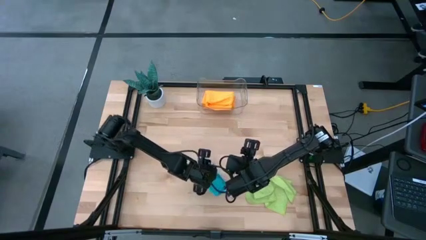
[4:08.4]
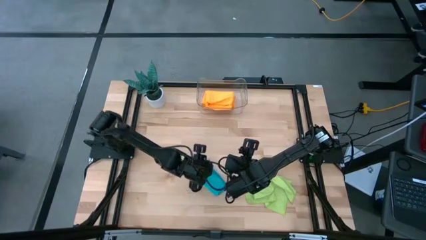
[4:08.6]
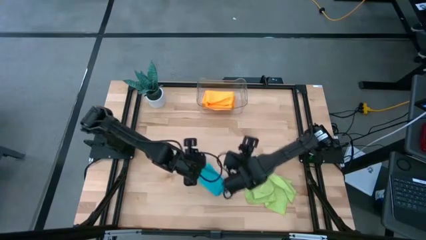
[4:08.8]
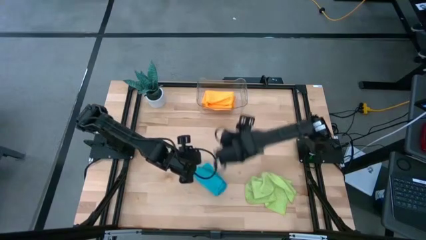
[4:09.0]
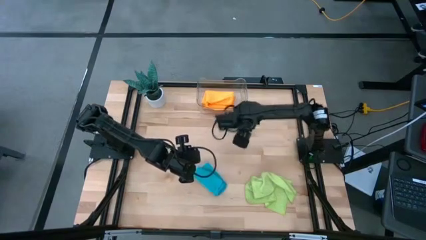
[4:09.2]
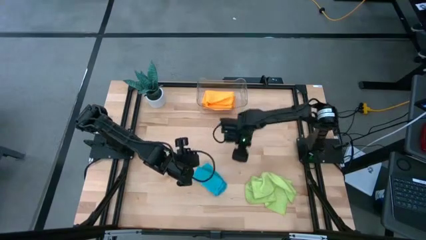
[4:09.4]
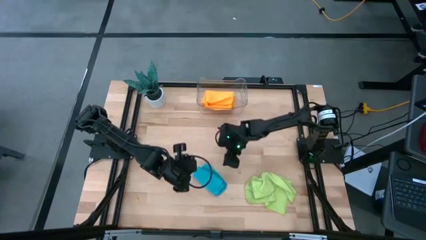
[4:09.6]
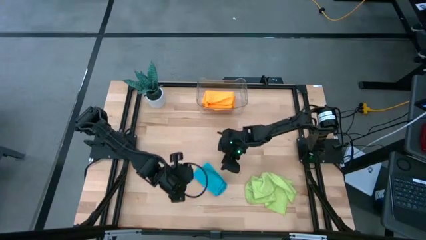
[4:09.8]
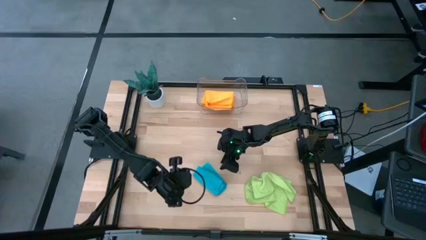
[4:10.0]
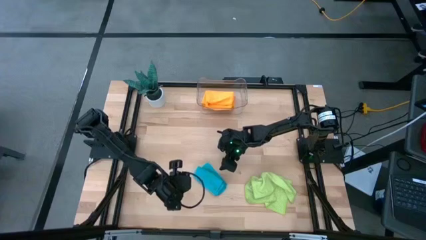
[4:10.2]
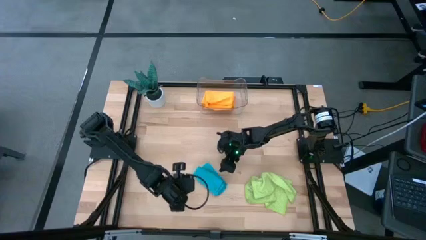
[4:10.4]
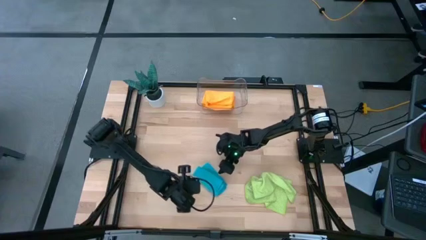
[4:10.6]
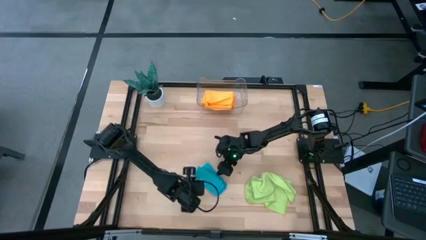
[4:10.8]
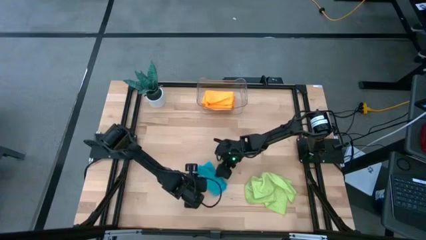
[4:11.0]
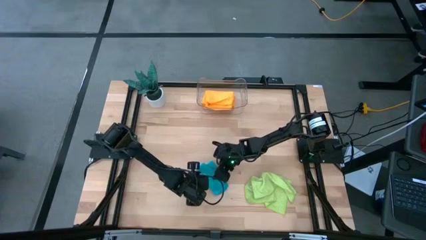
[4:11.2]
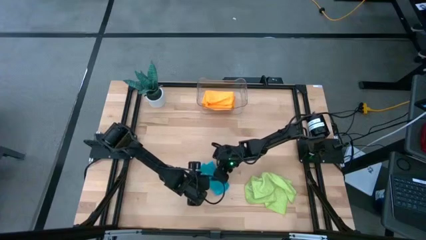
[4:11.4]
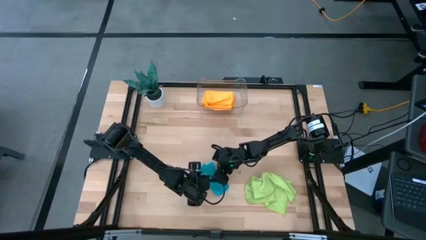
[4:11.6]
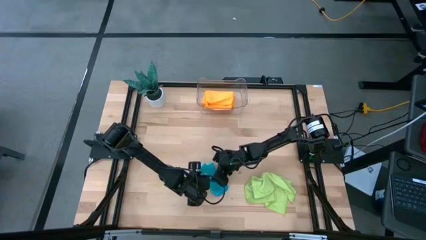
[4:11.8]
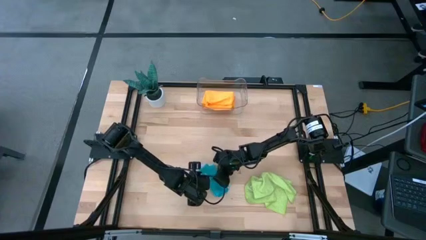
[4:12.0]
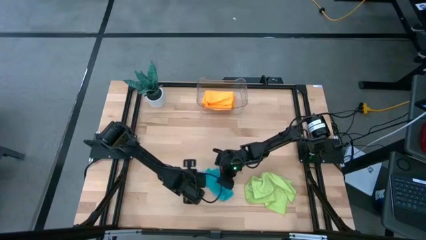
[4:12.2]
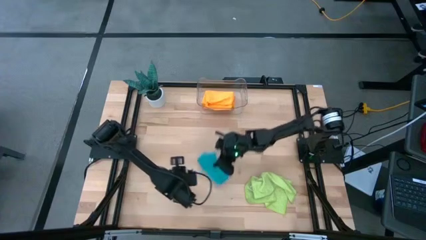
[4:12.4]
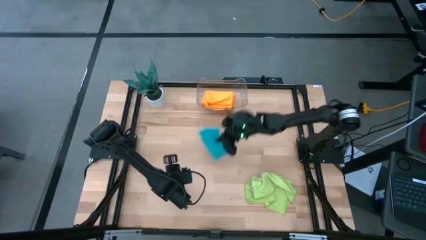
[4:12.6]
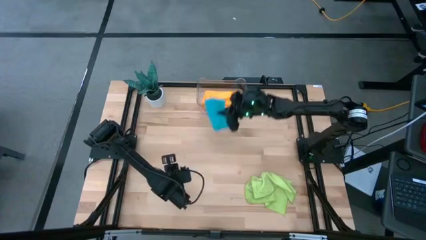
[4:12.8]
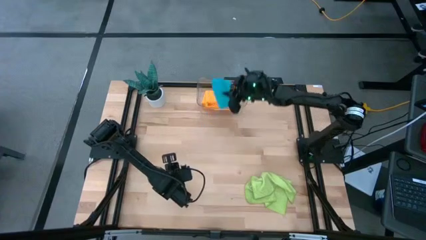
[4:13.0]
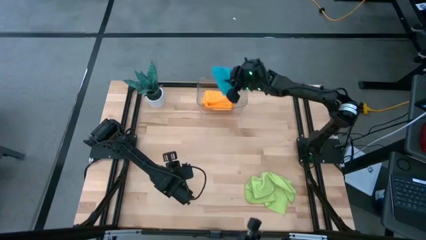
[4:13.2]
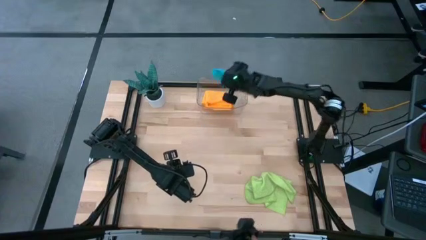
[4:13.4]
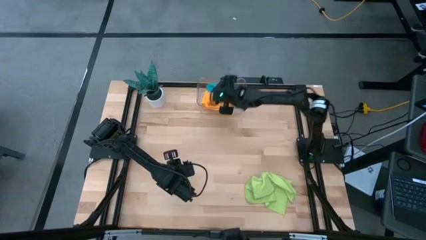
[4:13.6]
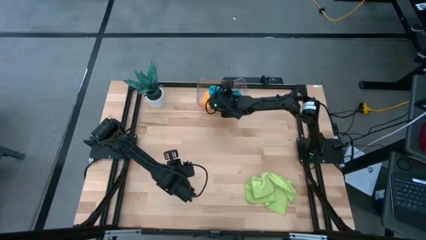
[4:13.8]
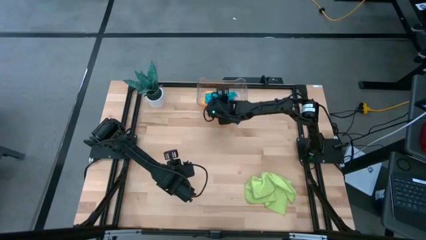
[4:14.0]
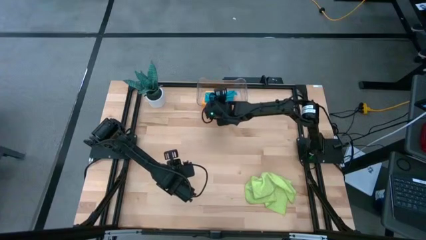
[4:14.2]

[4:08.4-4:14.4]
Task: Fold microfiber towels
Put the blue microfiber towel into the transparent bin

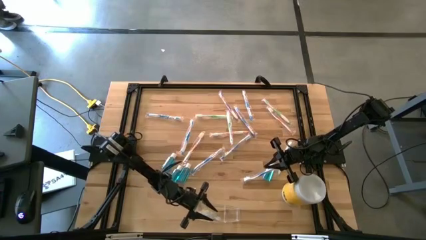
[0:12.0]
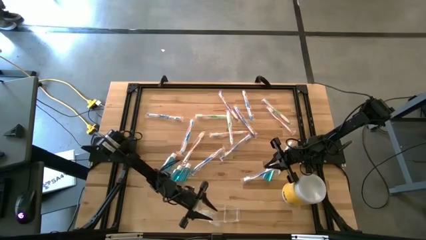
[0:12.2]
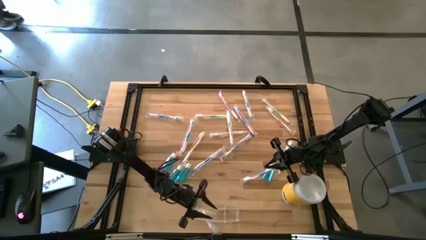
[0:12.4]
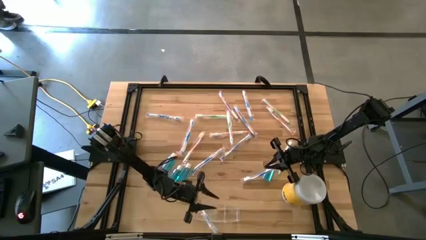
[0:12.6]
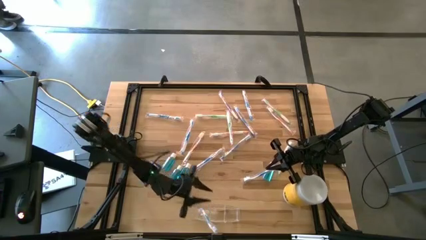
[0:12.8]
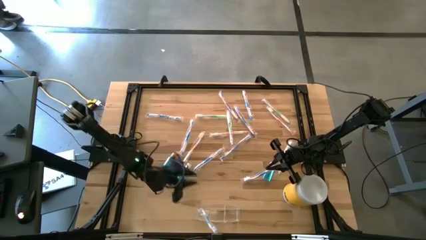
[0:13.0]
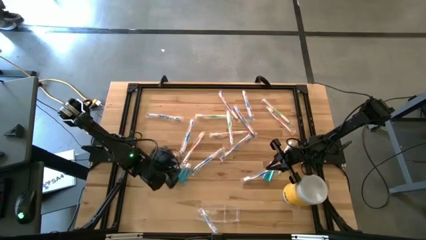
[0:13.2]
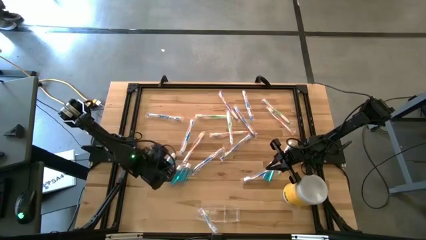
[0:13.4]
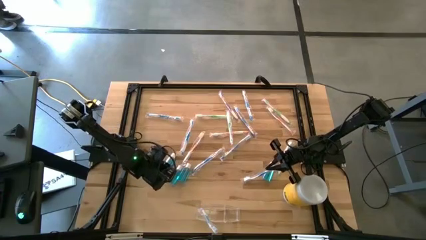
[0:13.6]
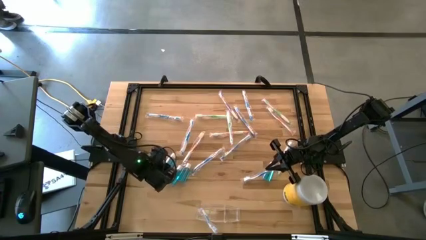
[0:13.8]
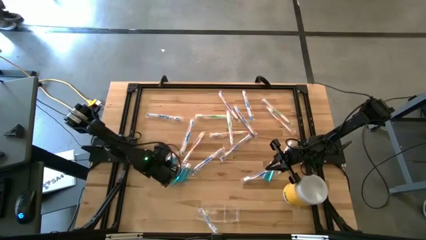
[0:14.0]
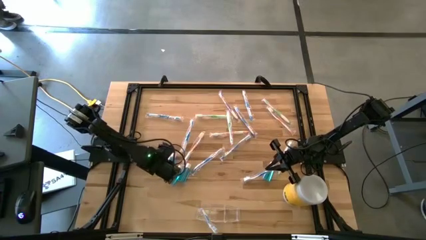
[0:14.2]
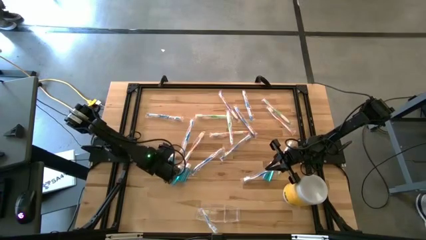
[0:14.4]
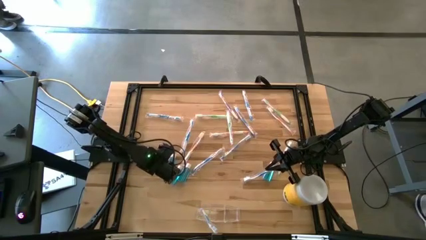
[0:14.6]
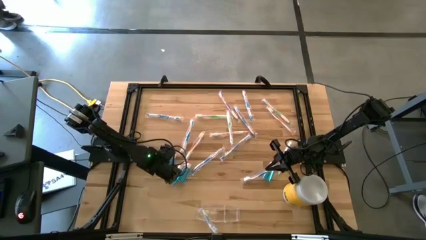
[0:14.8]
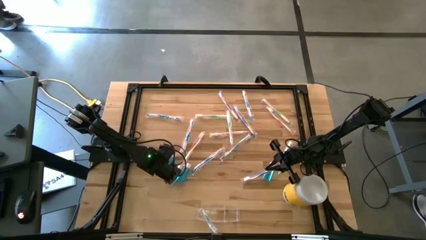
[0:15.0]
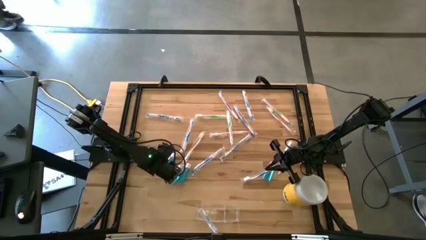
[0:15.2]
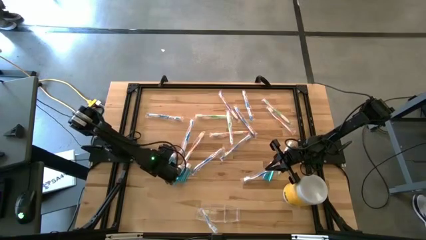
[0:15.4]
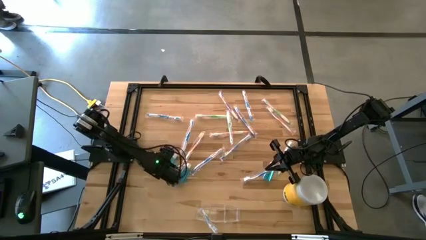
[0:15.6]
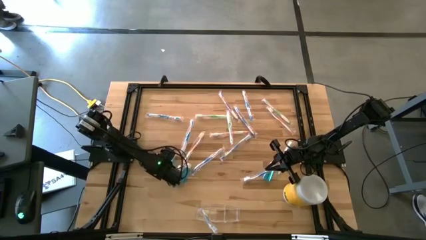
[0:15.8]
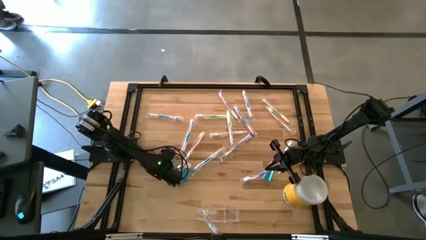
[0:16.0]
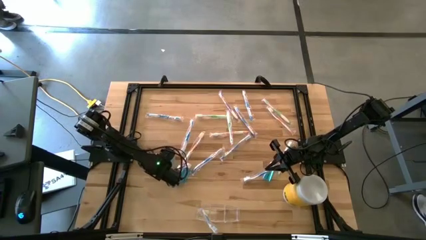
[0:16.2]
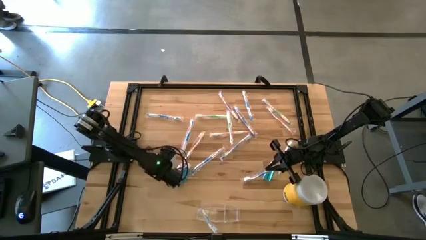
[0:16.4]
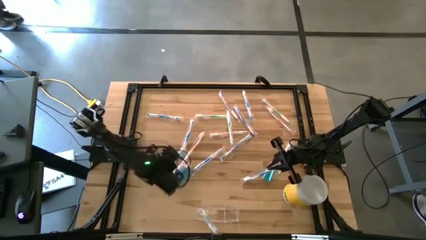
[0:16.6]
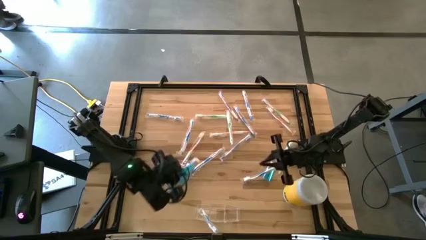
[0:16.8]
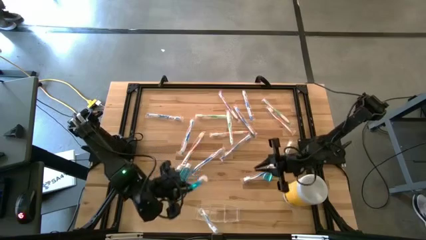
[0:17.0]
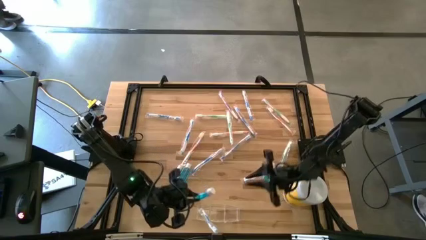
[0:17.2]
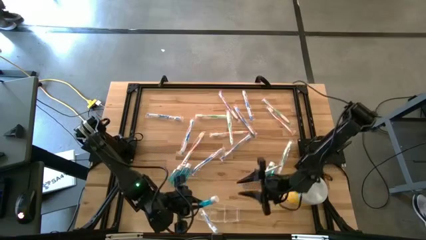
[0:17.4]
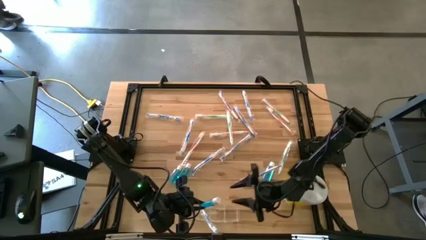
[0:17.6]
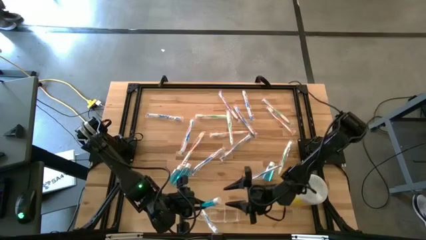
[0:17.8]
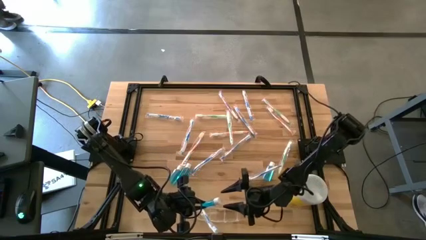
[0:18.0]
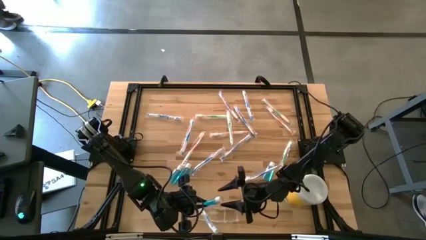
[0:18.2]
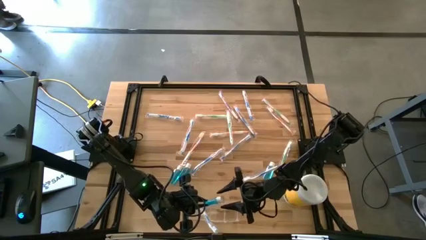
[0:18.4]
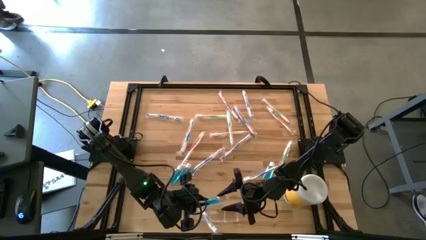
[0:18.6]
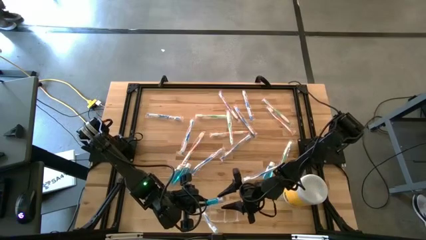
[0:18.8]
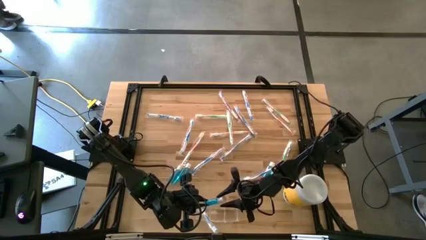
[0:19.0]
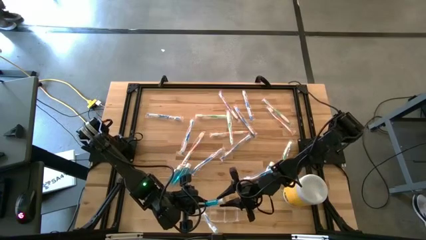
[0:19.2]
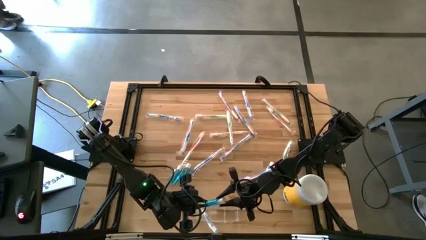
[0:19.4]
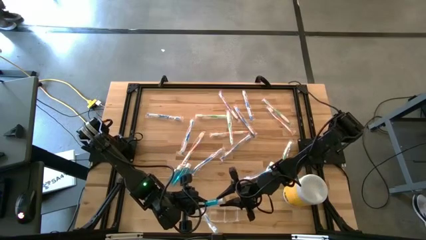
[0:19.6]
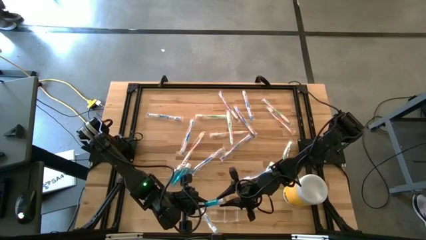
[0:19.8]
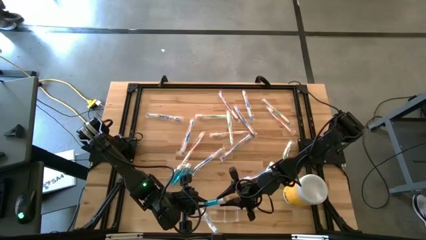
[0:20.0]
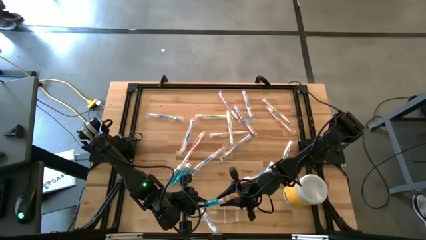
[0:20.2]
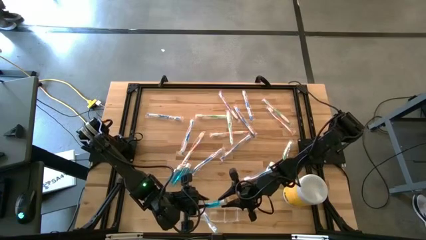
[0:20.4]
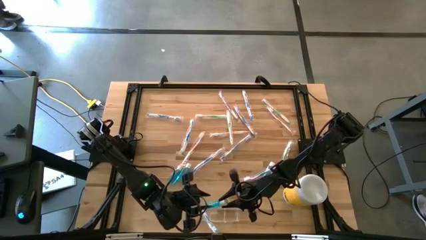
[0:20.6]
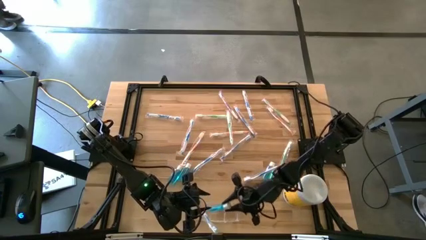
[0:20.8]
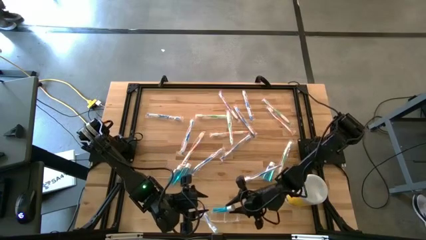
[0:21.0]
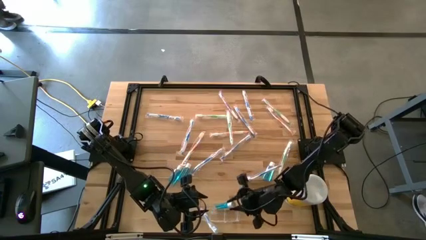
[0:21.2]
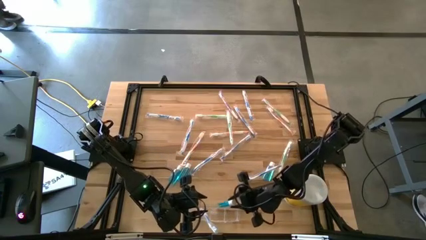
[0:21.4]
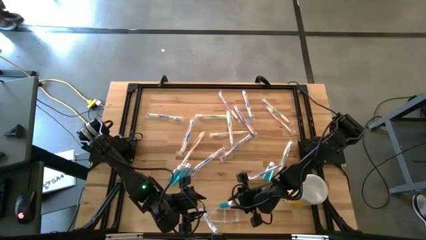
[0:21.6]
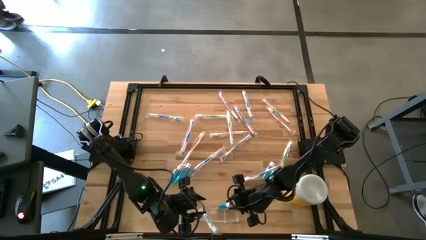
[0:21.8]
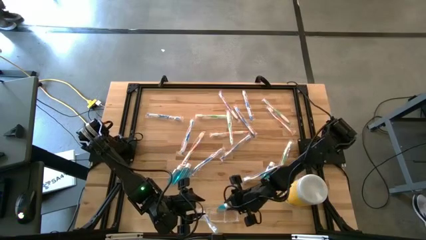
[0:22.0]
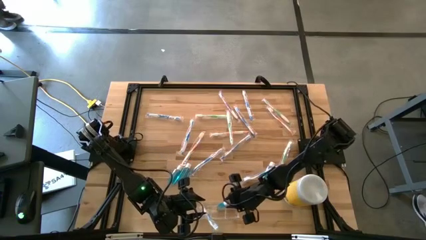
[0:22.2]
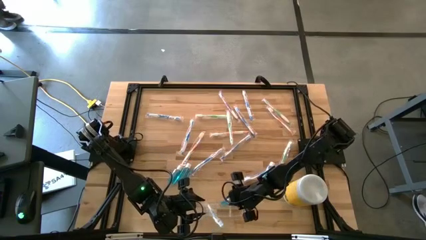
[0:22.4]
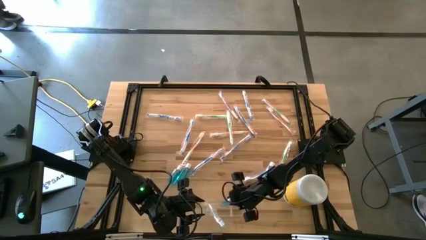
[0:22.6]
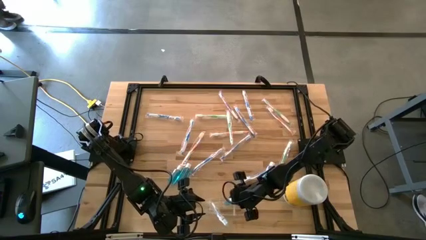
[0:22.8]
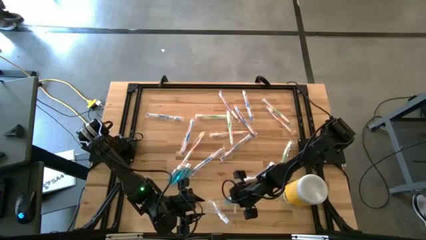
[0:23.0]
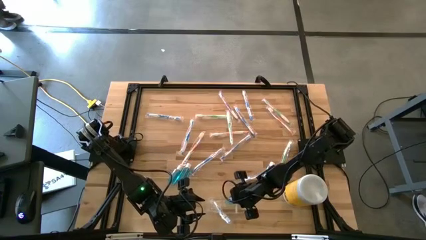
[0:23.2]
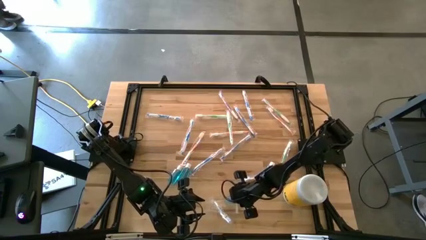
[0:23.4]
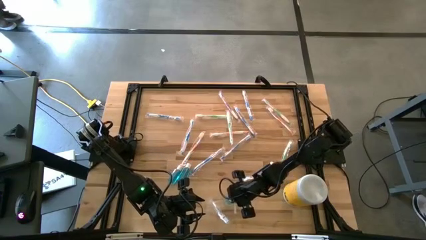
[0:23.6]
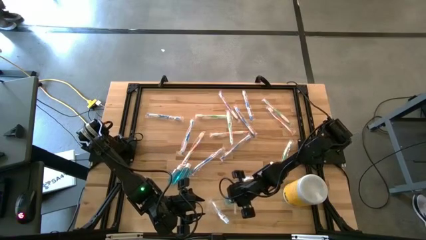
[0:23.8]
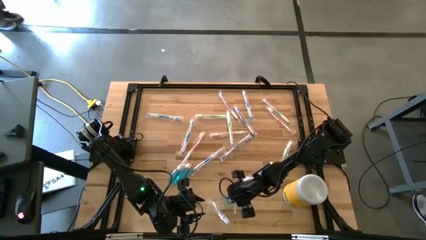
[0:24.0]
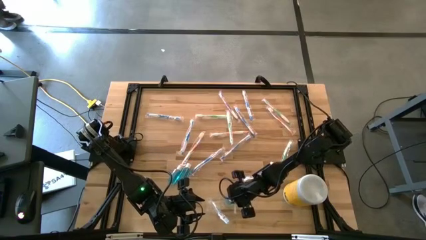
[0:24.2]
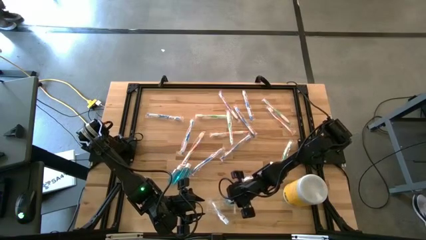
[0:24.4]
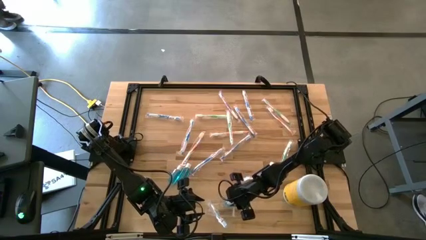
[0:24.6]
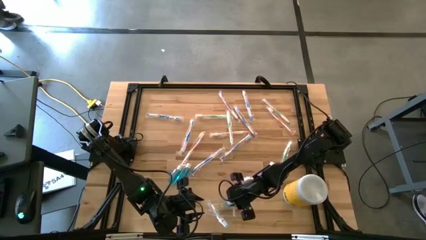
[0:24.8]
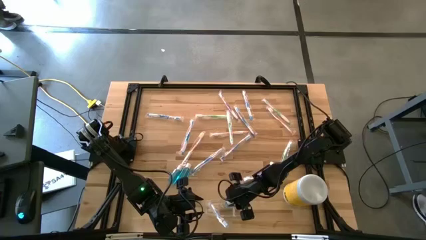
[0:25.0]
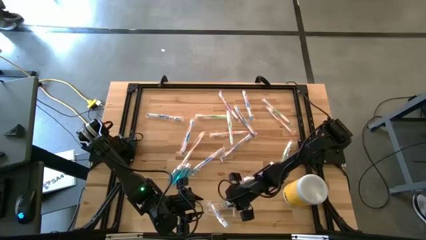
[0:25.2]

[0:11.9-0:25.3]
Task: Pick & Place toothbrushing station
Put the mouthwash into the transparent organizer
